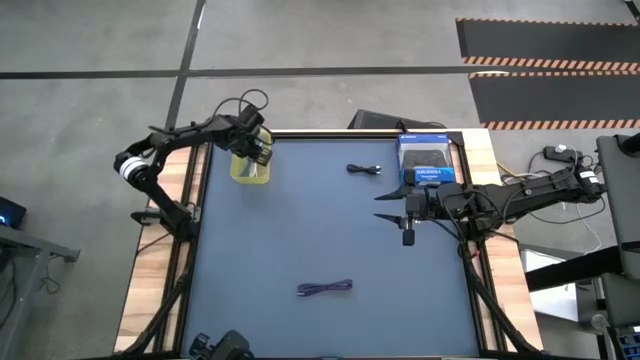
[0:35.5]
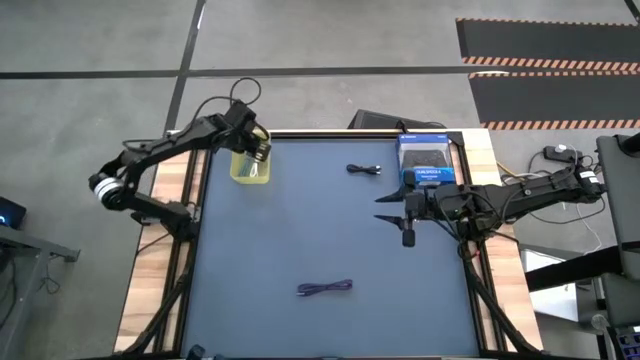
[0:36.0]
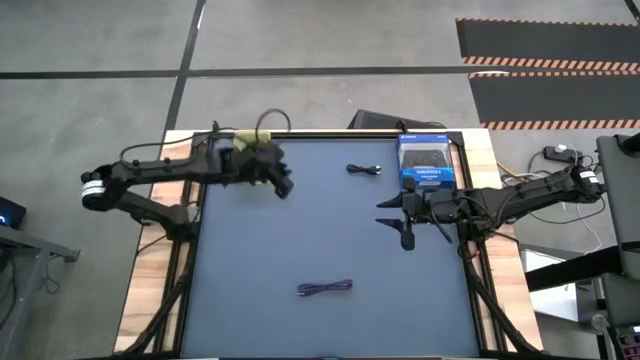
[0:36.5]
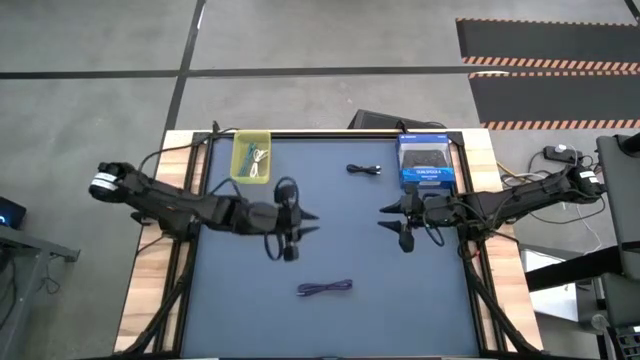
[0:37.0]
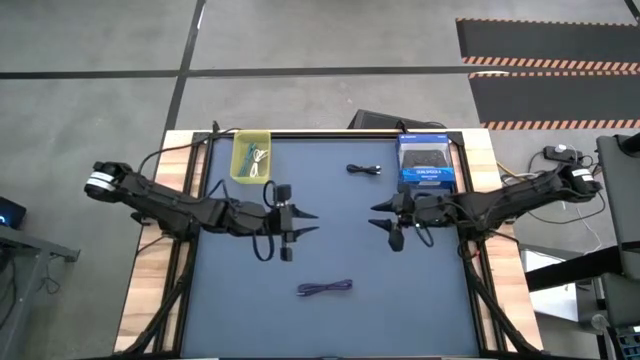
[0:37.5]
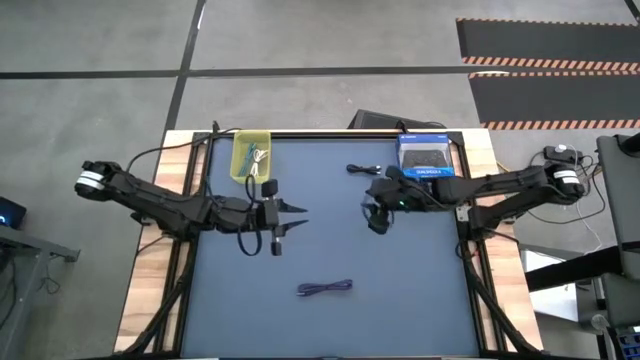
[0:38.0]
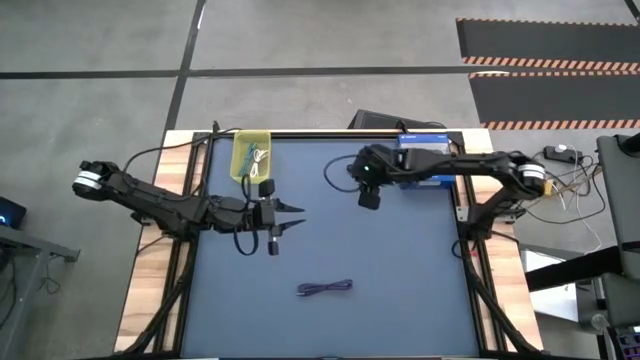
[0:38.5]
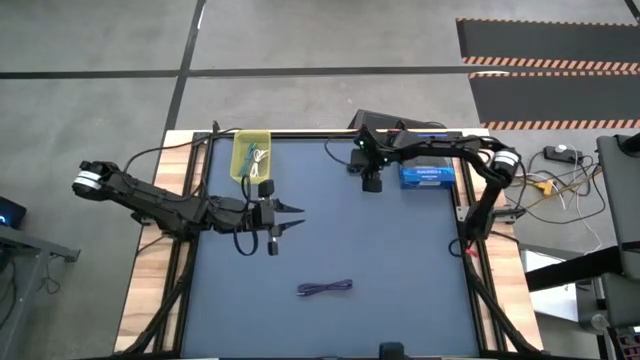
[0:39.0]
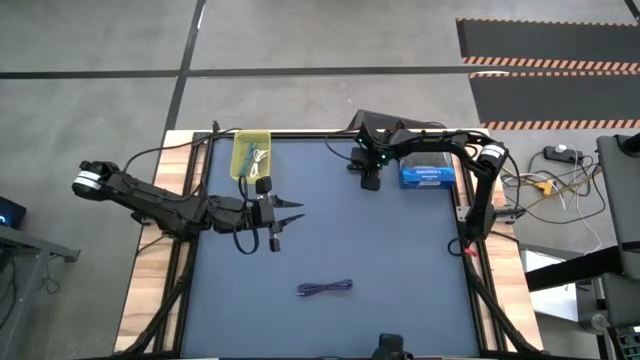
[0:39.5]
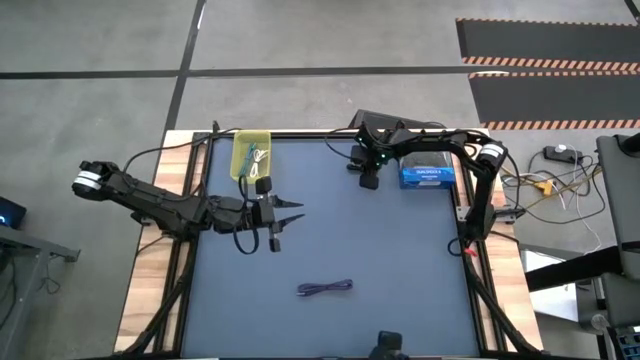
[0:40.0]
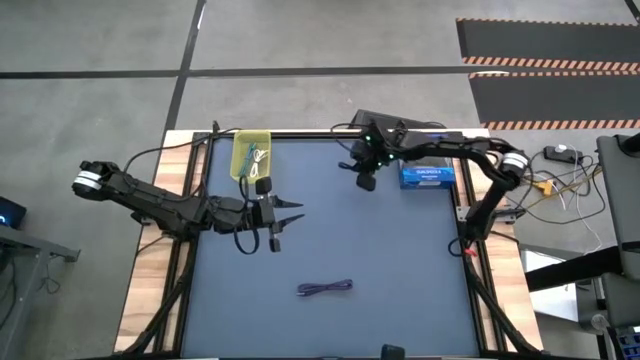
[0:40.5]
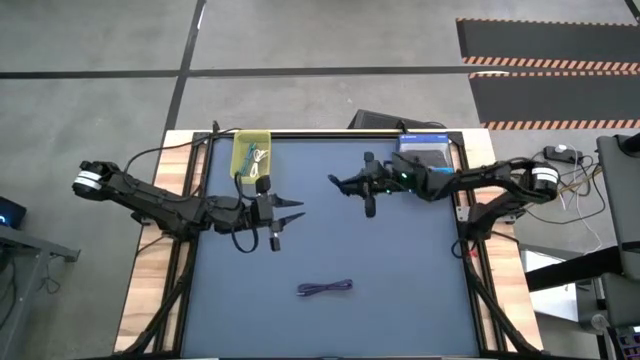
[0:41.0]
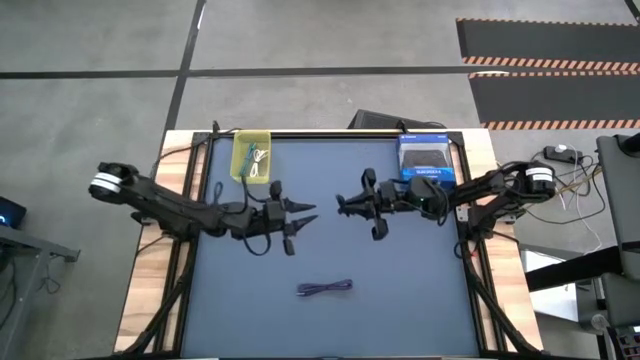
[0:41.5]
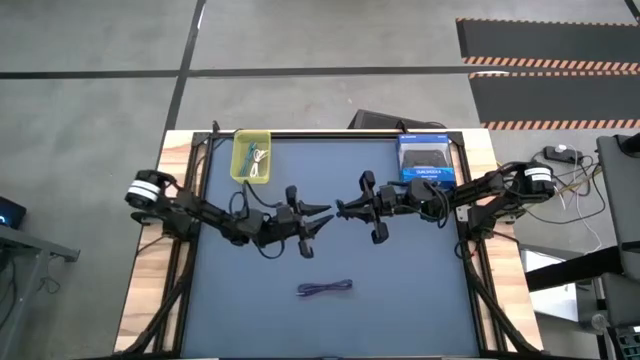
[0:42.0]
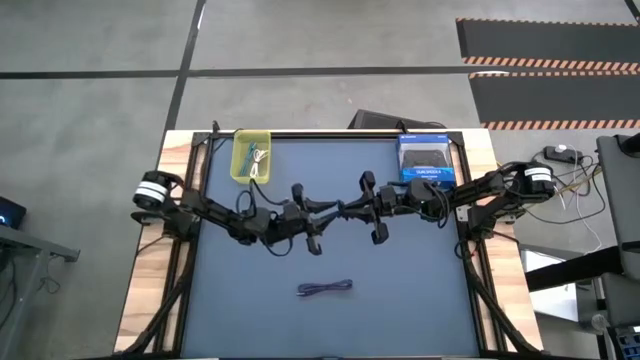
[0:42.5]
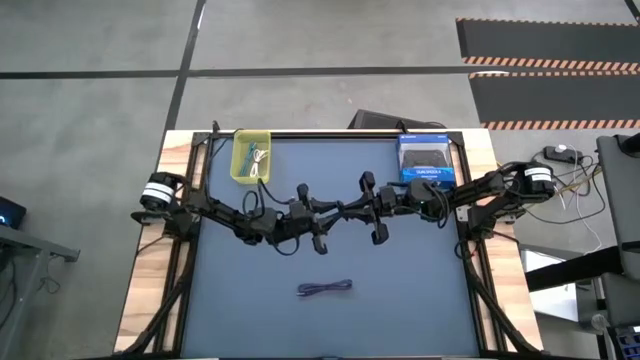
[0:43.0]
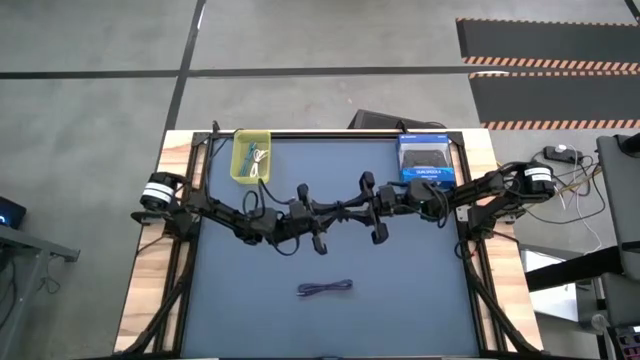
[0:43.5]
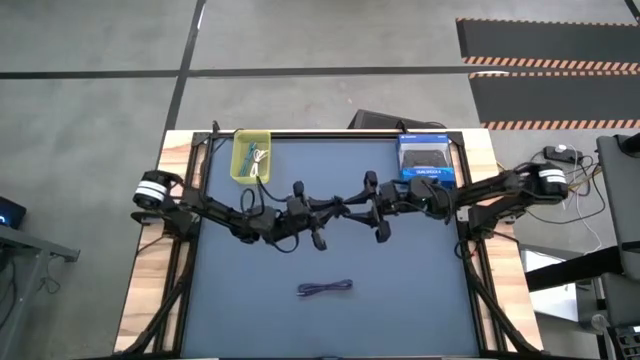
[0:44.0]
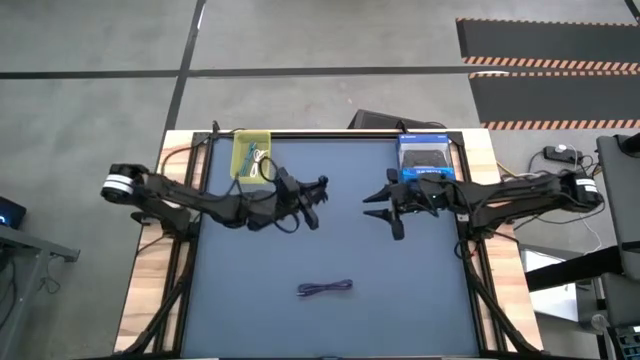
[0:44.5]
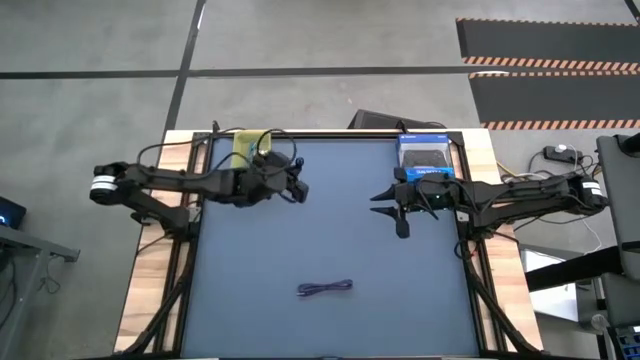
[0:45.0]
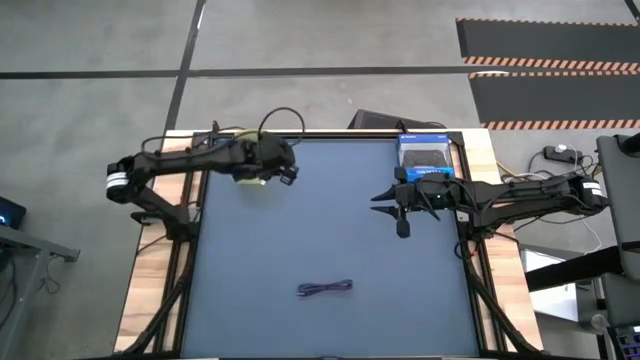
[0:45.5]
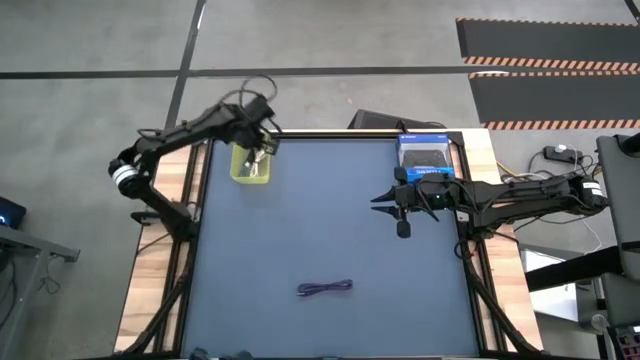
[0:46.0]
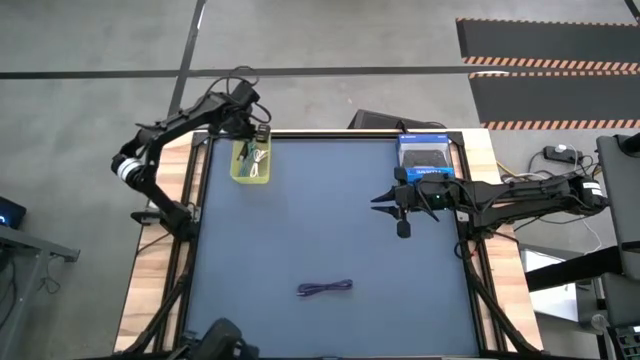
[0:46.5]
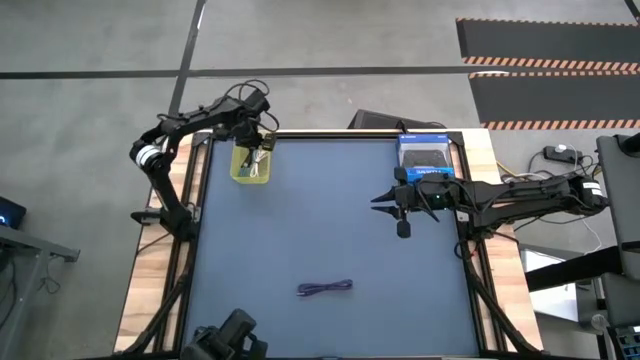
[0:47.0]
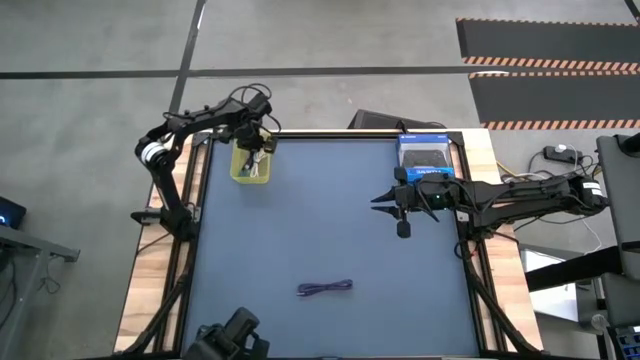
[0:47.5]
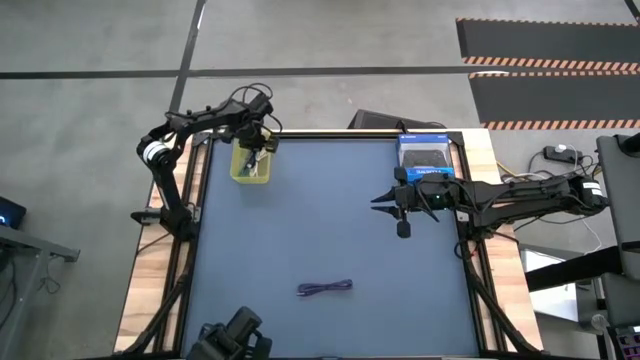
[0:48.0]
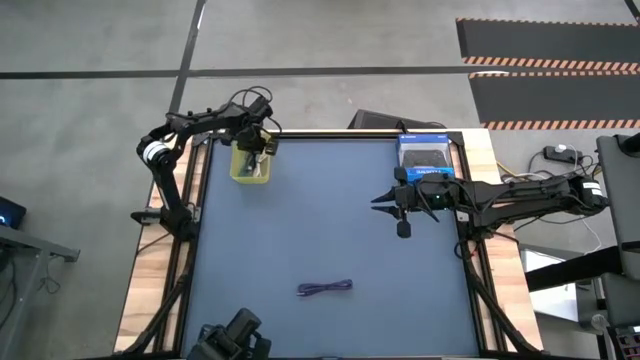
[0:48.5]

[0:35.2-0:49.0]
Task: Pick and place USB-C Cables
Put the black charger cable into the yellow bin

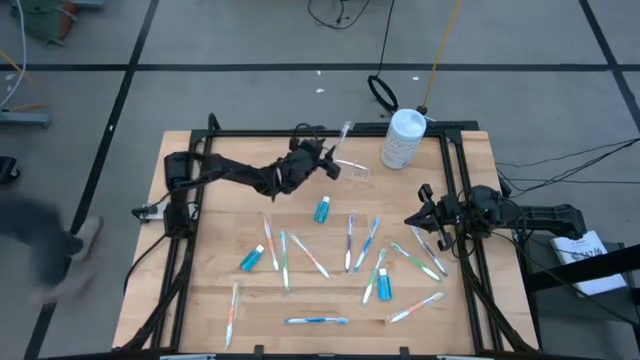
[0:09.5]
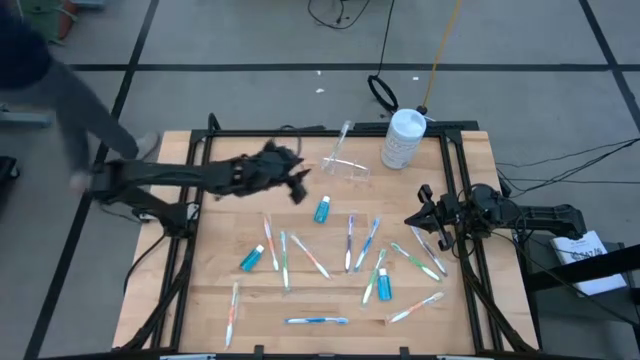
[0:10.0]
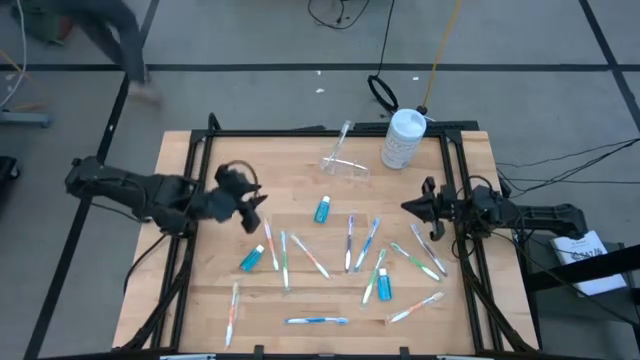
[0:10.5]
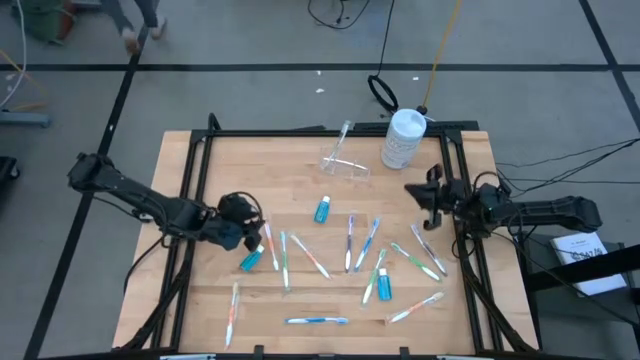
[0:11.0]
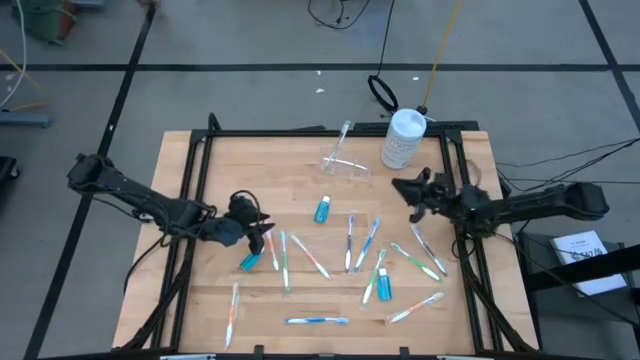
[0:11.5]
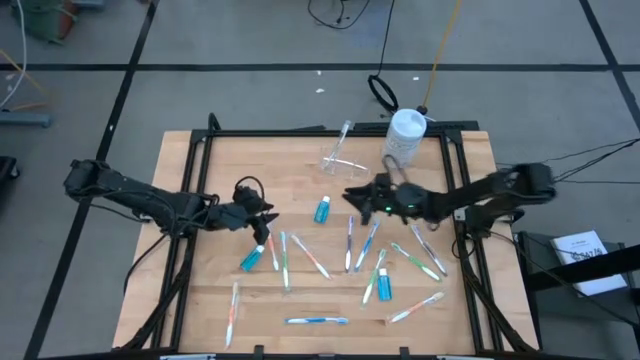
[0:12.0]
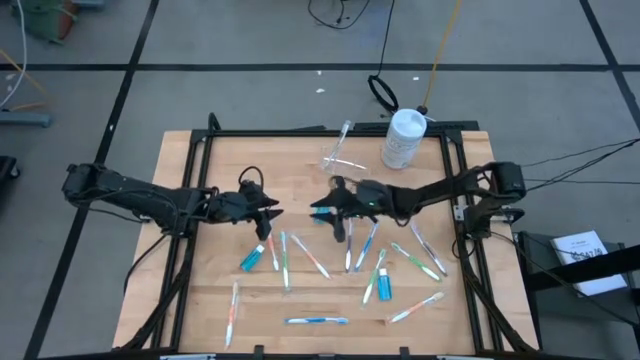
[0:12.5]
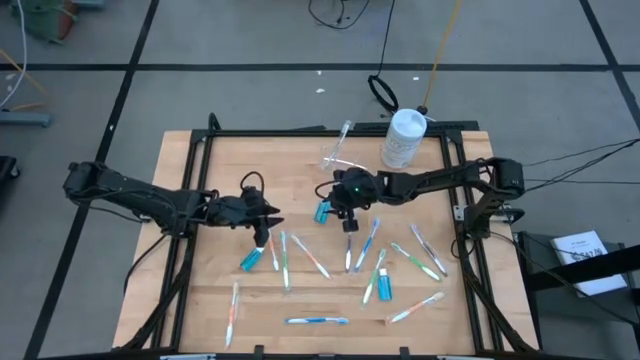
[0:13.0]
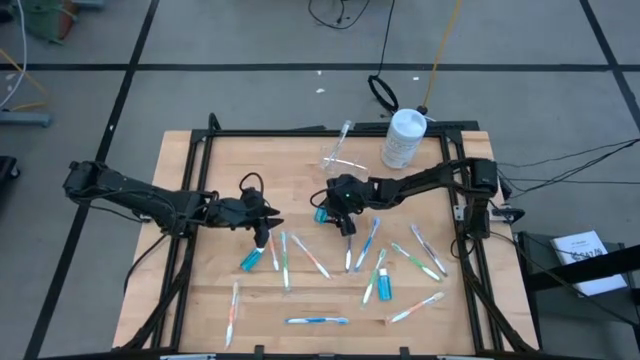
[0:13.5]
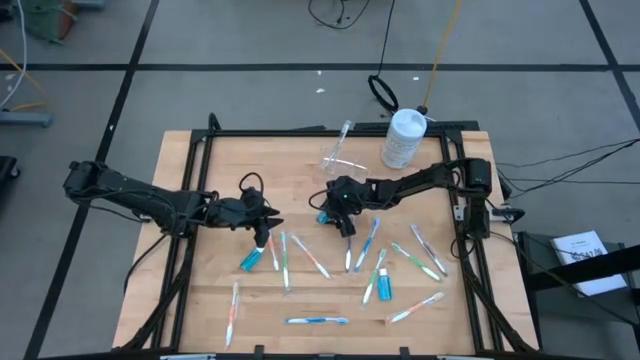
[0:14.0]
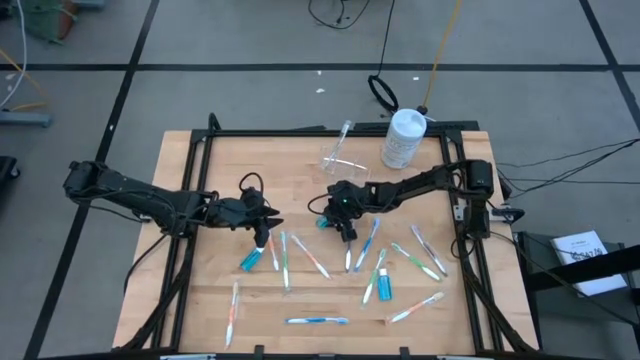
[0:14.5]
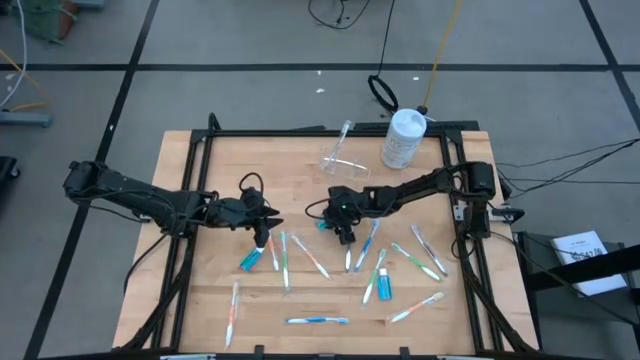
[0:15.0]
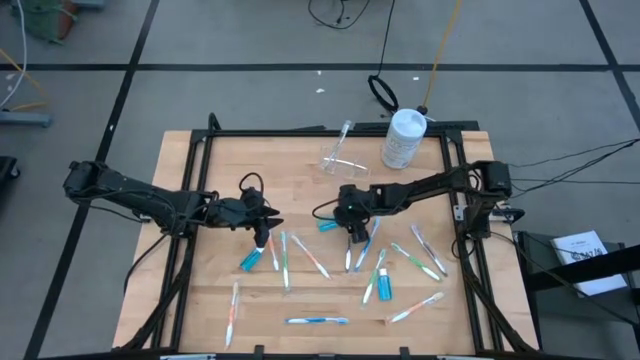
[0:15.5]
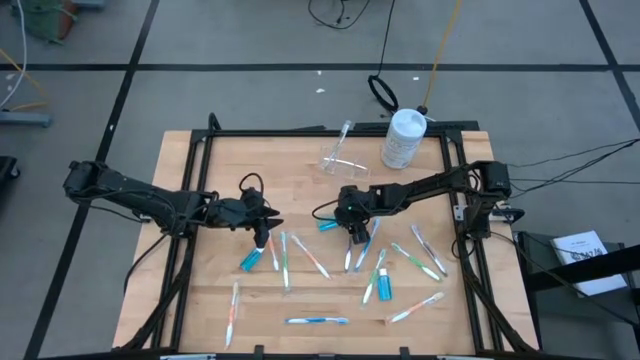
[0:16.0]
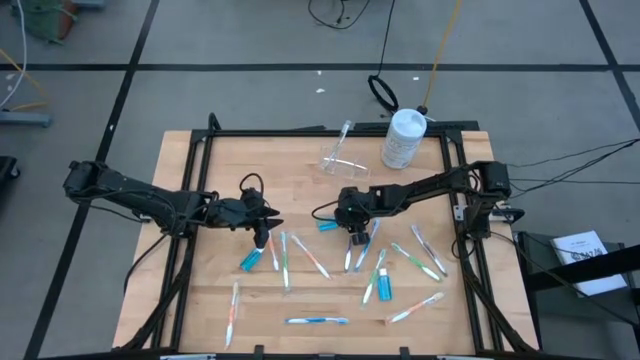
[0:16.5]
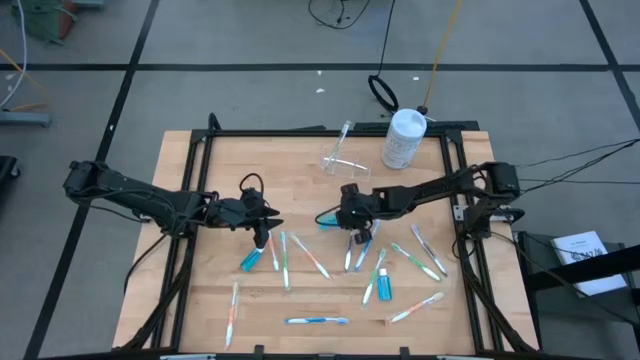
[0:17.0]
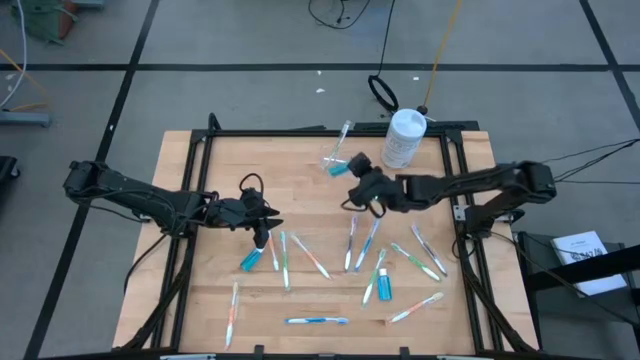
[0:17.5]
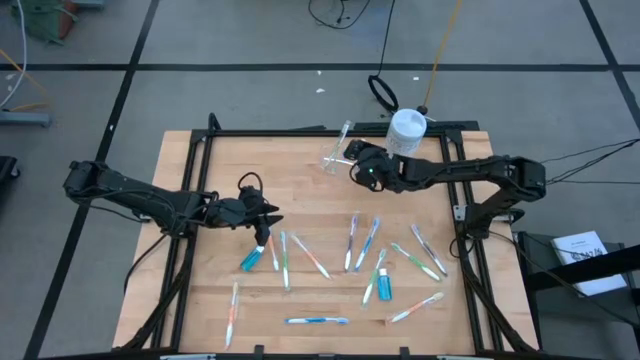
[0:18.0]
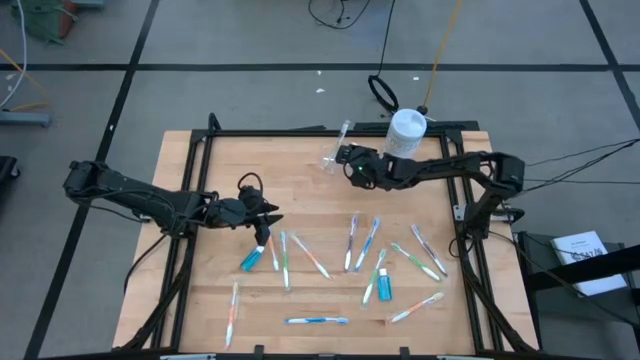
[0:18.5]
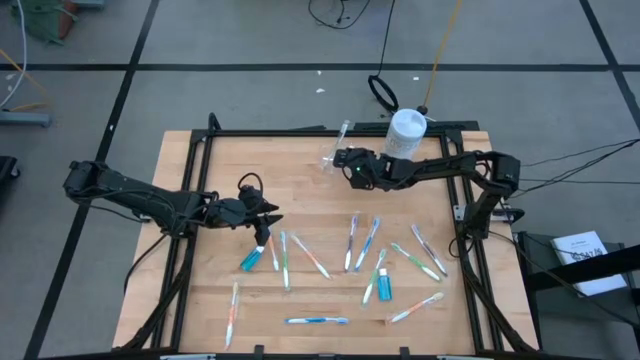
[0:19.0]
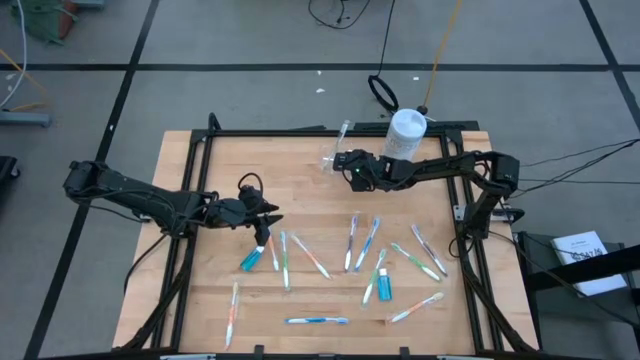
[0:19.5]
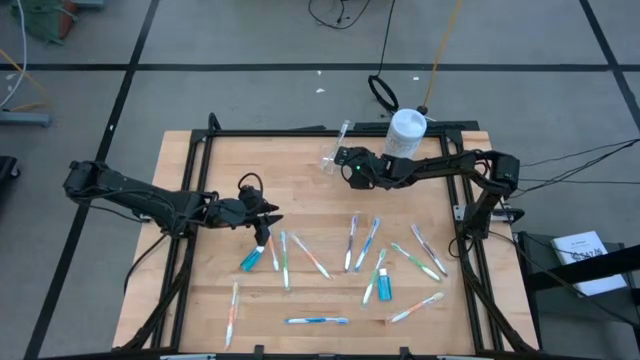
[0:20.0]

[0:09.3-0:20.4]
Task: Pick & Place toothbrushing station
Put the blue mouthwash into the transparent organizer
